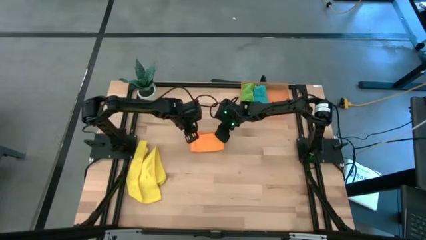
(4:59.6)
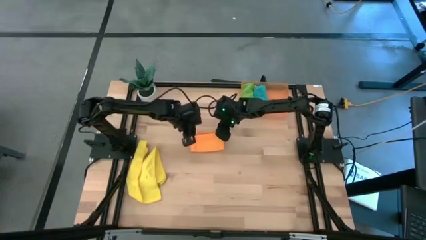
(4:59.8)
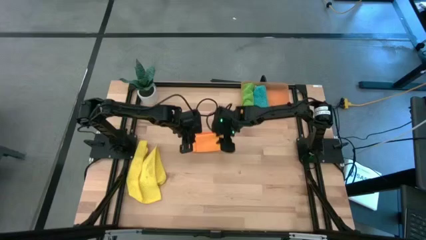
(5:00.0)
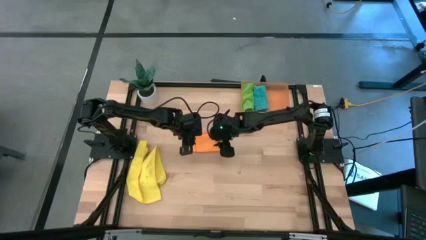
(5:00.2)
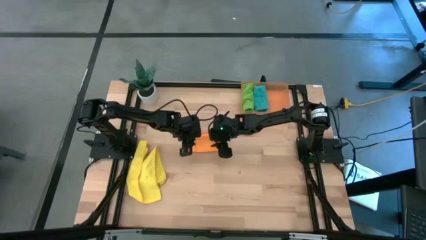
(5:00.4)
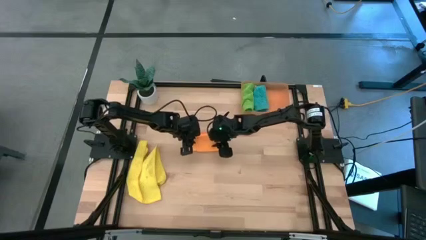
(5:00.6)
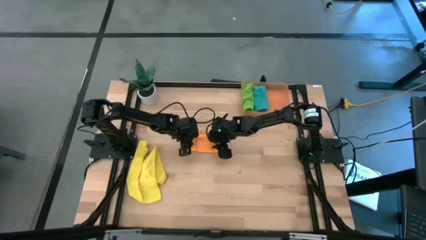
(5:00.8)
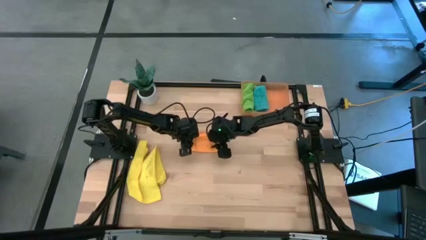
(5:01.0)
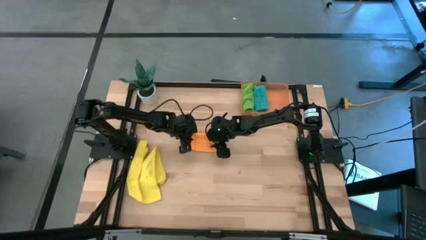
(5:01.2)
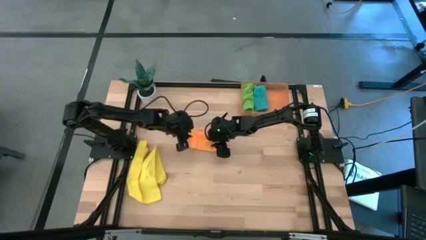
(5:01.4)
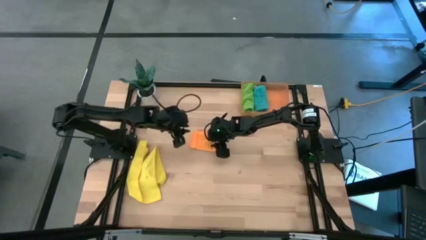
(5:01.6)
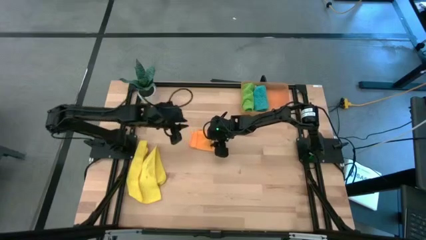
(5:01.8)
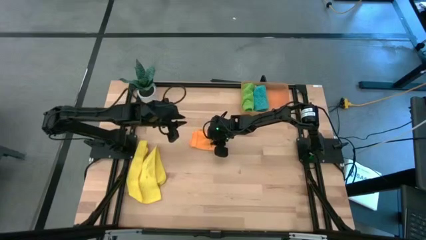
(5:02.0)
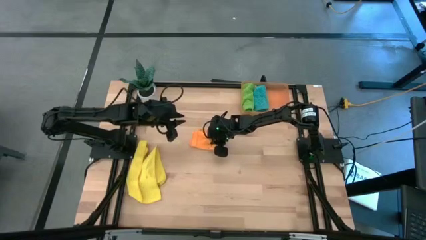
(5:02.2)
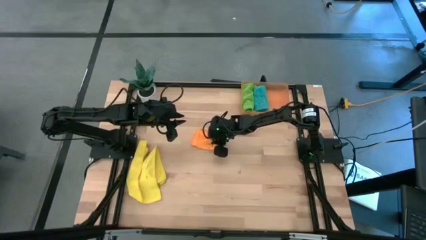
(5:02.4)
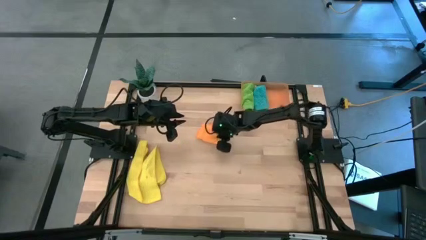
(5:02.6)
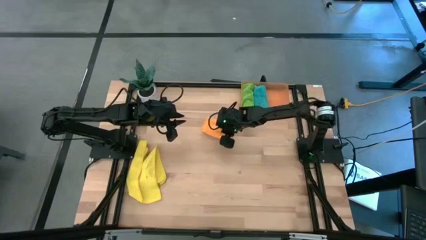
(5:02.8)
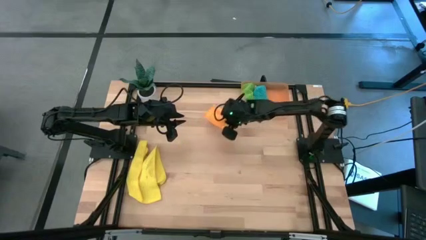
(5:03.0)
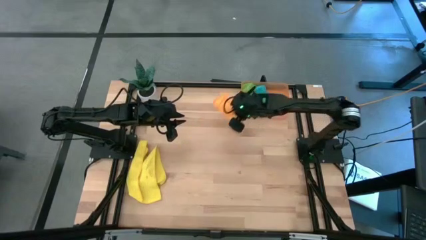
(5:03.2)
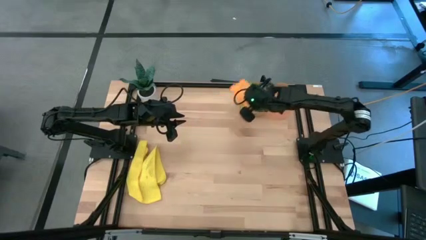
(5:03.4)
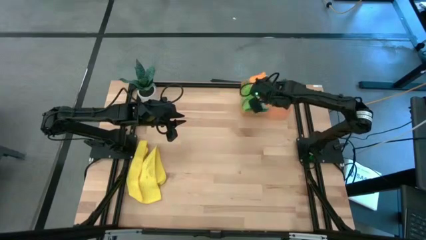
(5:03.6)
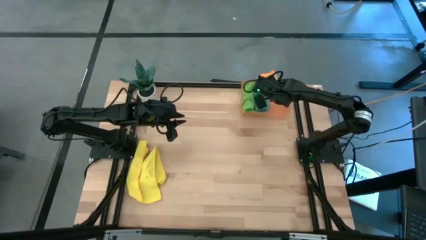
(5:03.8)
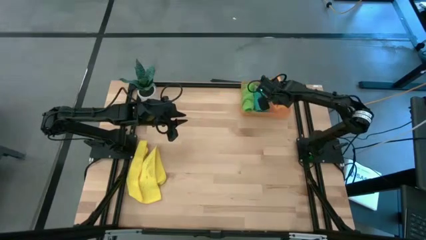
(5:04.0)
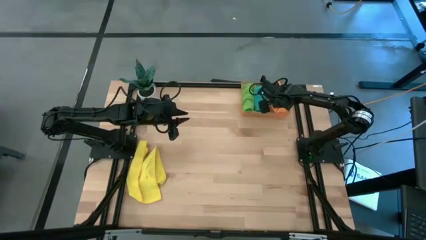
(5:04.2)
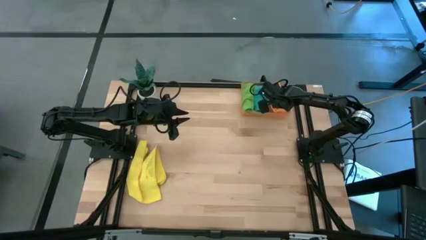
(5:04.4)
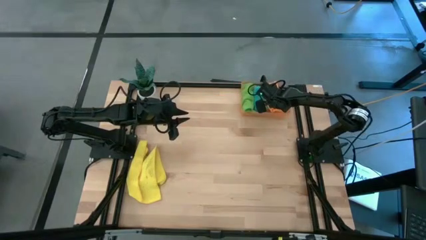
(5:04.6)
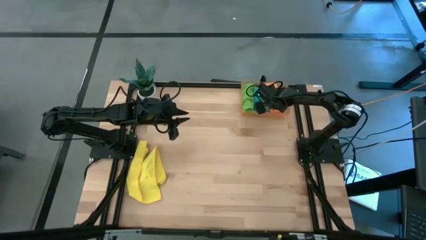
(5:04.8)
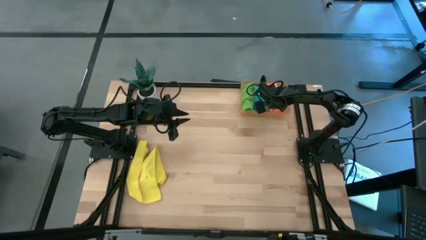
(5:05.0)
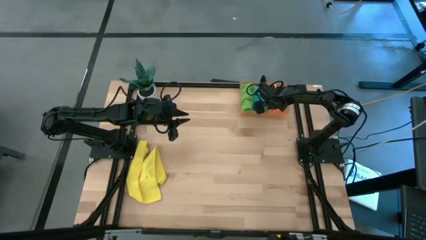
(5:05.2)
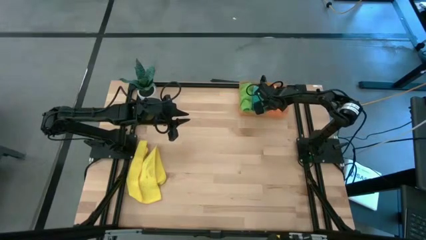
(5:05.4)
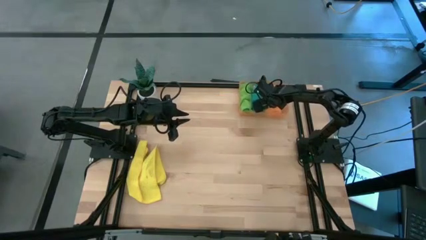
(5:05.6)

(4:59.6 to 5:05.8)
Task: Roll microfiber towels into tight, uniform cylinder then place into a basket
Put the orange towel into the bin

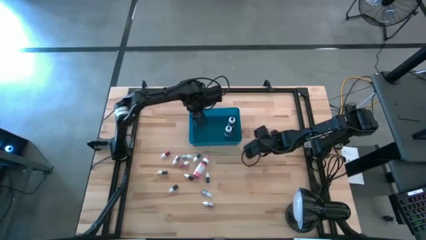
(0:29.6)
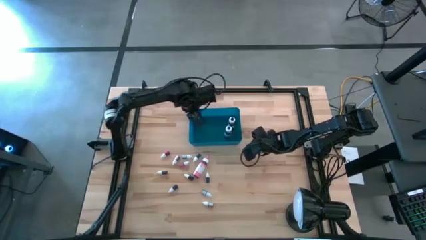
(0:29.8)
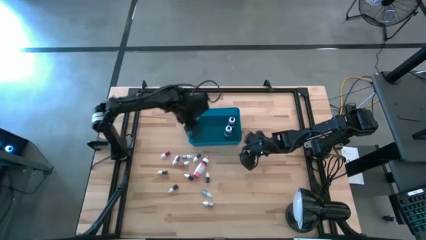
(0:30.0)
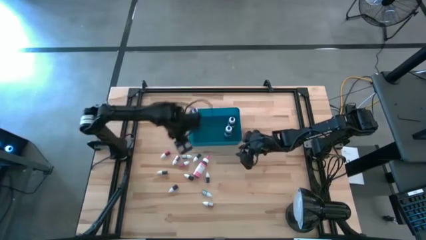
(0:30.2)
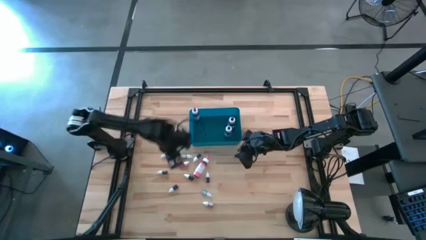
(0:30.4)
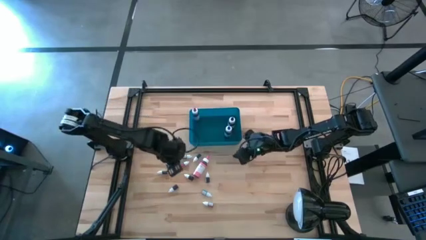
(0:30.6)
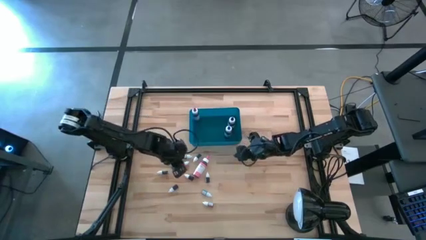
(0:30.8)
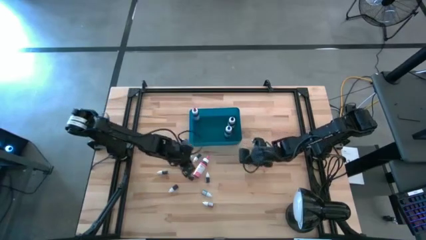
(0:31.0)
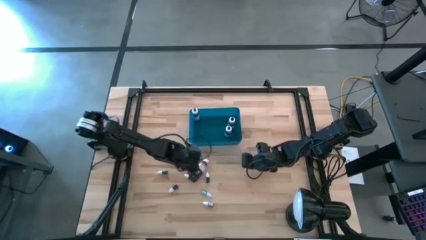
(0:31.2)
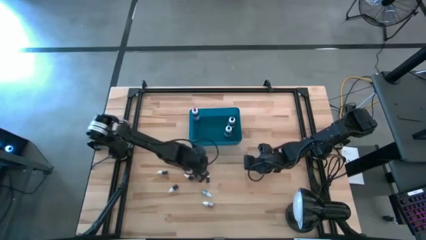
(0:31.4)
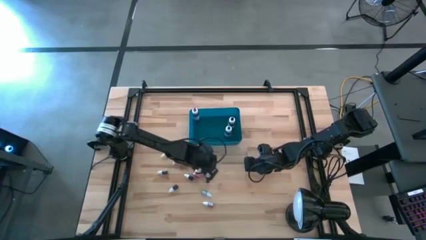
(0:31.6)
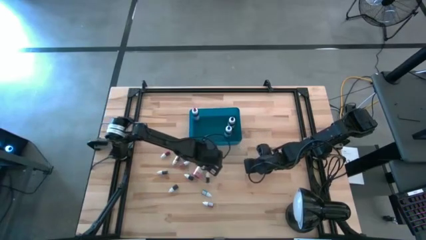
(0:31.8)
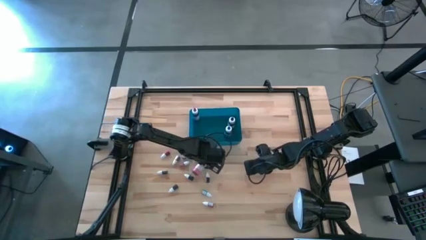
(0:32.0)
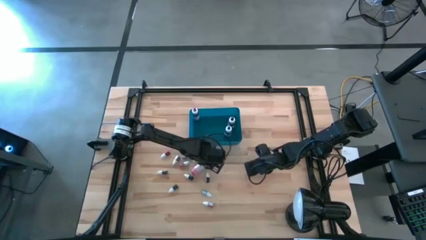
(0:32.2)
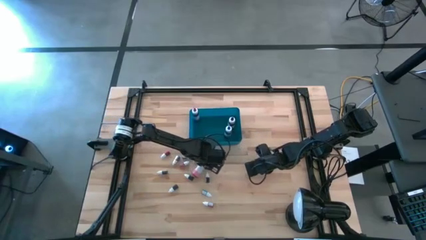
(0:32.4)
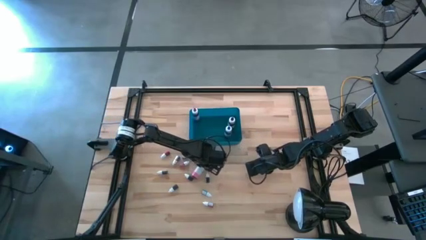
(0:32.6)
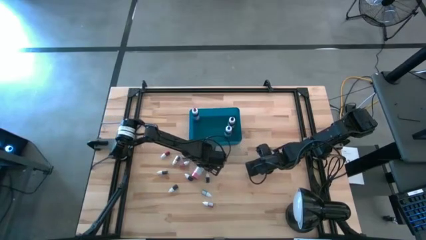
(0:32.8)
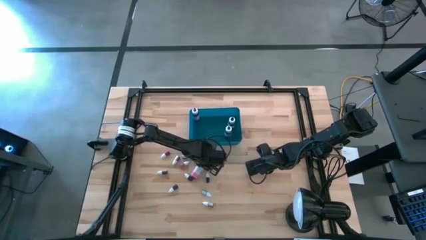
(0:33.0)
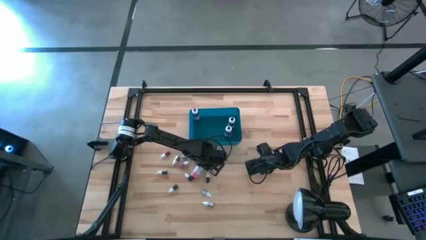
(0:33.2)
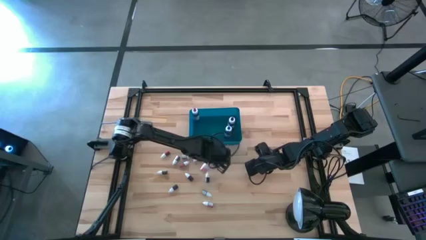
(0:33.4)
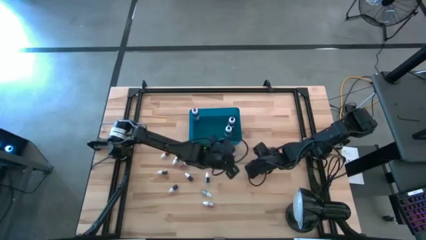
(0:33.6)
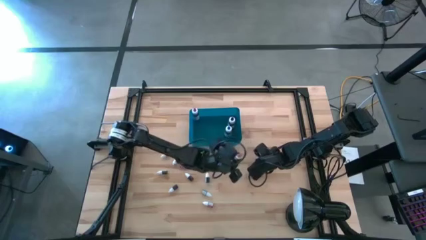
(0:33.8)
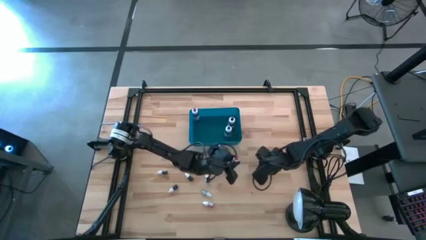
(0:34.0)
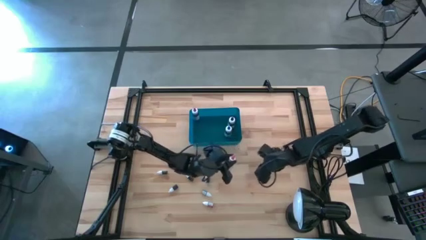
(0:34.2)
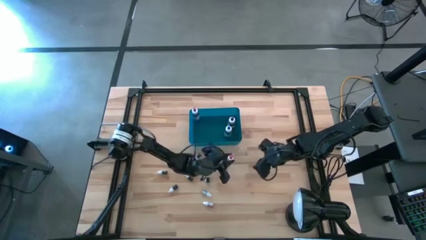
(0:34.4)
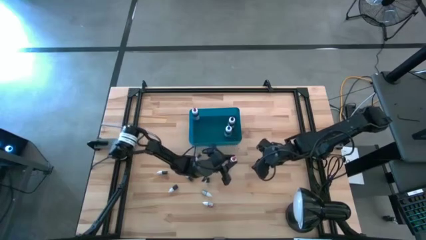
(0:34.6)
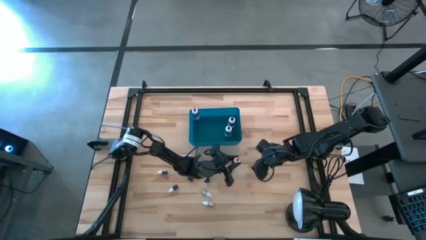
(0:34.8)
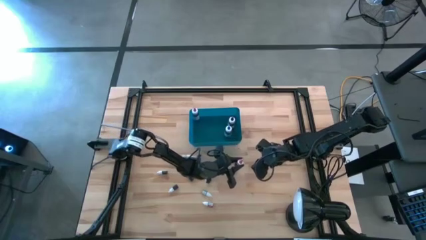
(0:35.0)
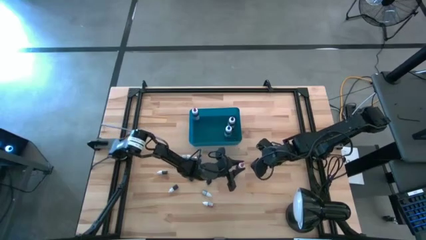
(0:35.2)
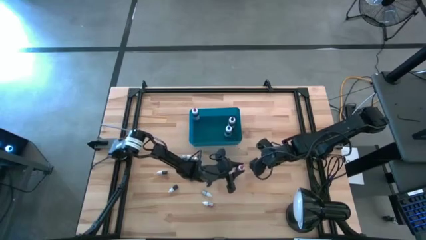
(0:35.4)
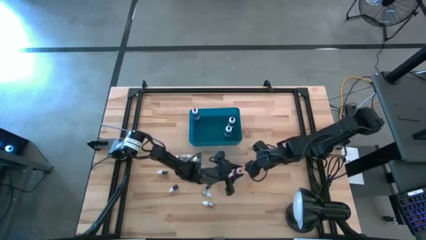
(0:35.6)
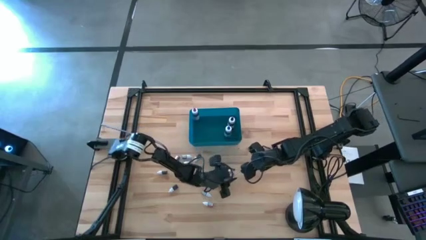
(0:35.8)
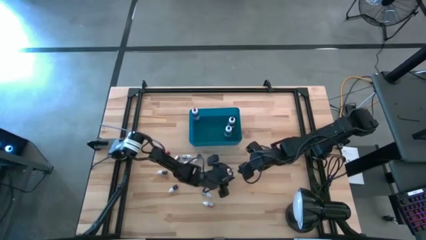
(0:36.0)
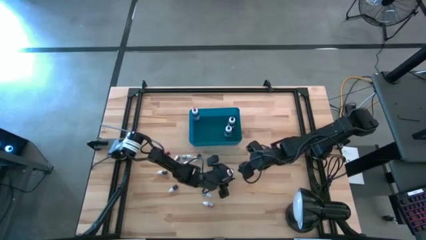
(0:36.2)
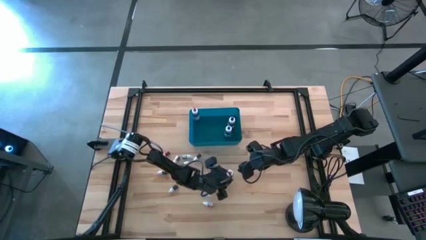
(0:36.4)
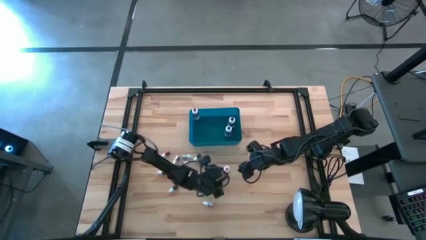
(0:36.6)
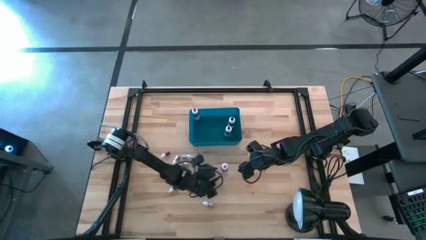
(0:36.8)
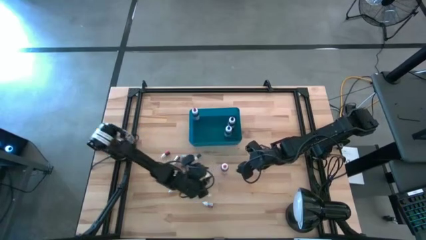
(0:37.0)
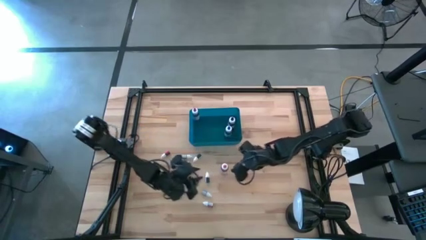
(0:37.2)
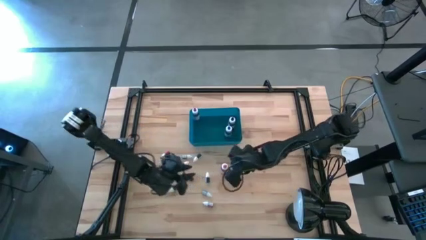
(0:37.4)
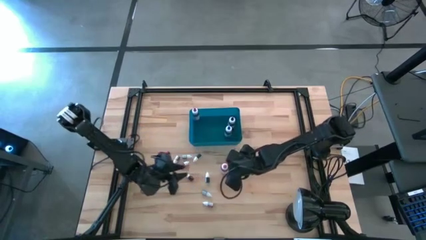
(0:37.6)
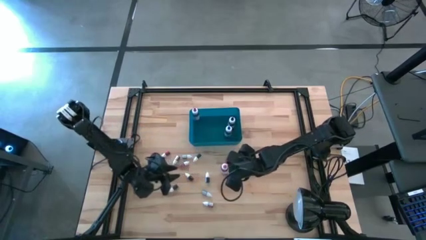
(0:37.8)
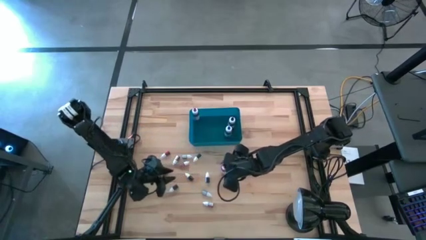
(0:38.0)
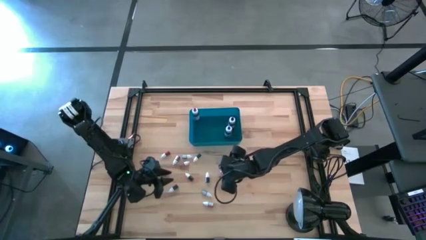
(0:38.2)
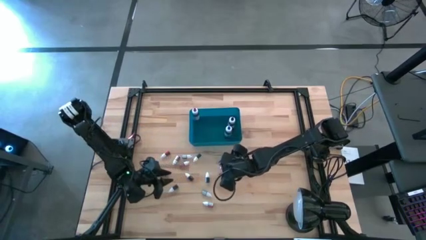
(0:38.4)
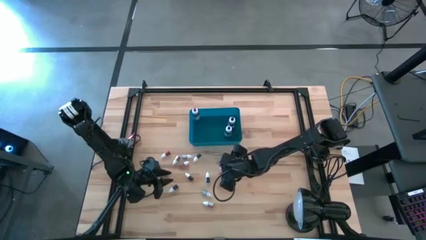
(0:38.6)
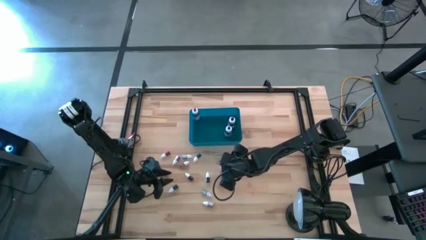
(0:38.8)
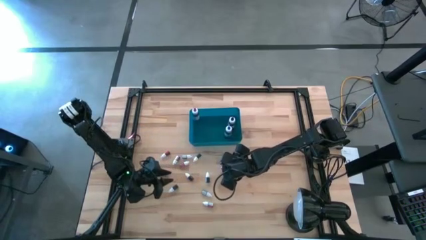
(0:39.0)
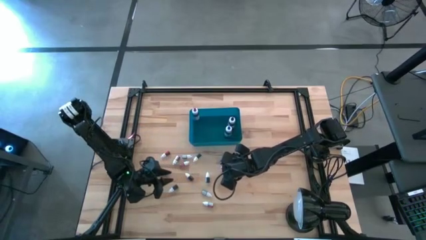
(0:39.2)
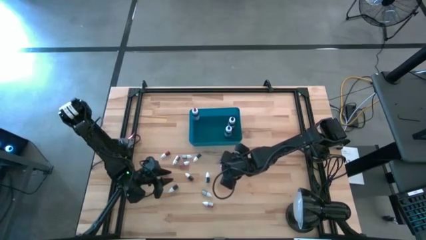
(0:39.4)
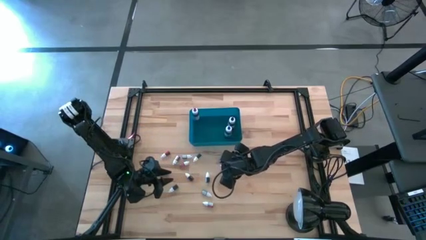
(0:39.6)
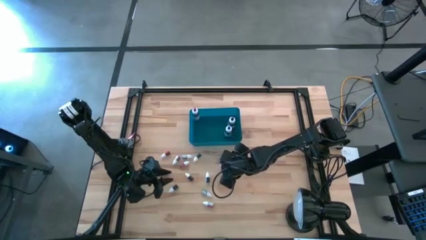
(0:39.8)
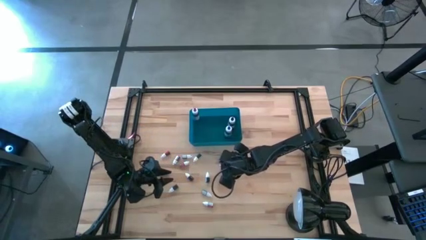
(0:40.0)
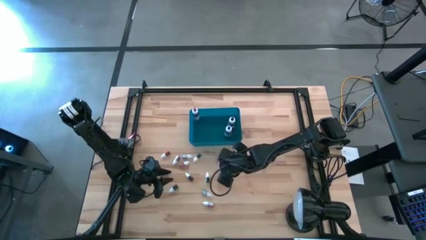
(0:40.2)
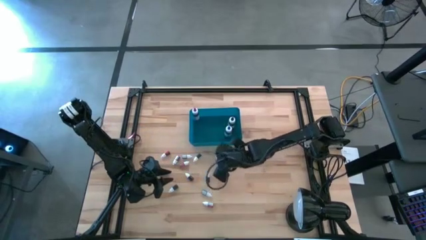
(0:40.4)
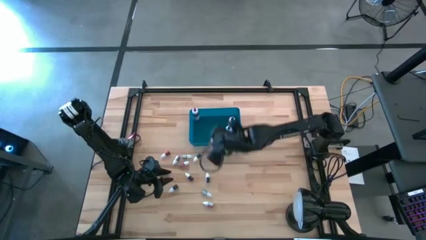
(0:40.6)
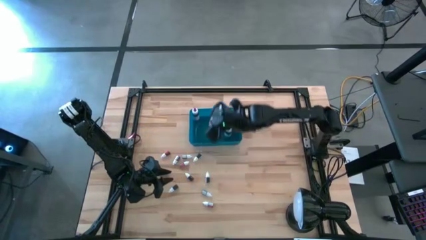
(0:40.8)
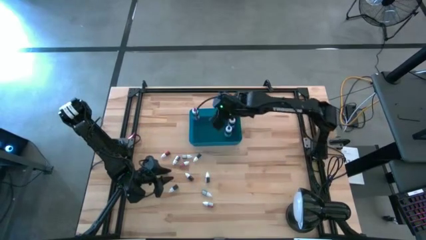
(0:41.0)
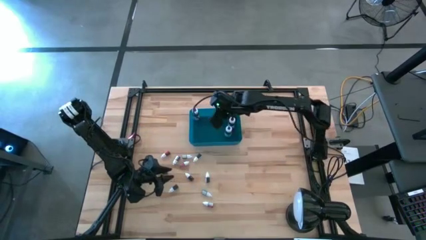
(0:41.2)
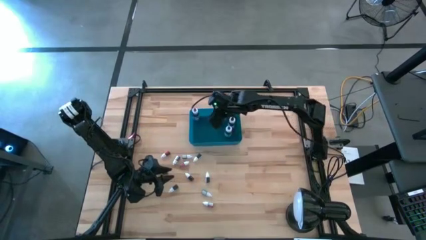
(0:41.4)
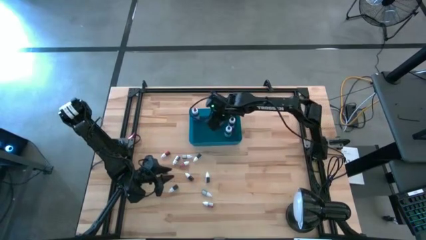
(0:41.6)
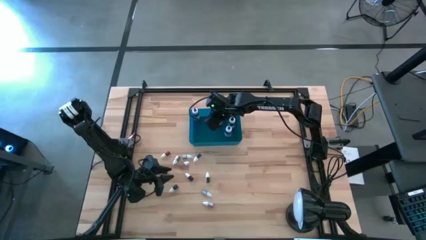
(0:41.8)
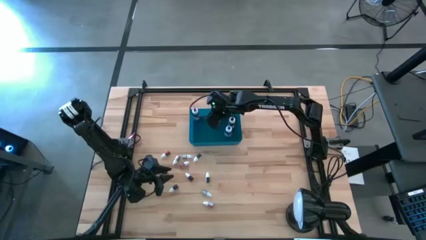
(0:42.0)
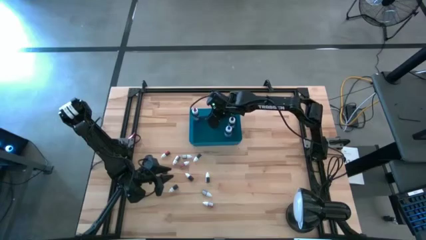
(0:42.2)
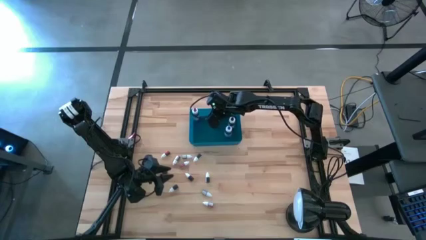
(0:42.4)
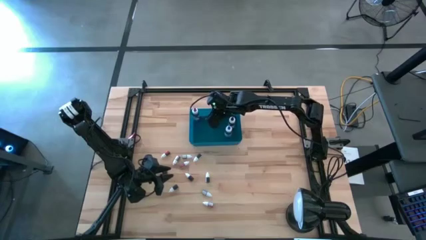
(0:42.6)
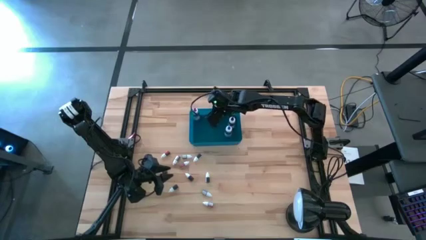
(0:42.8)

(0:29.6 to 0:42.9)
Task: Pick & Place food coloring
Put the large pink food coloring bottle into the bin
